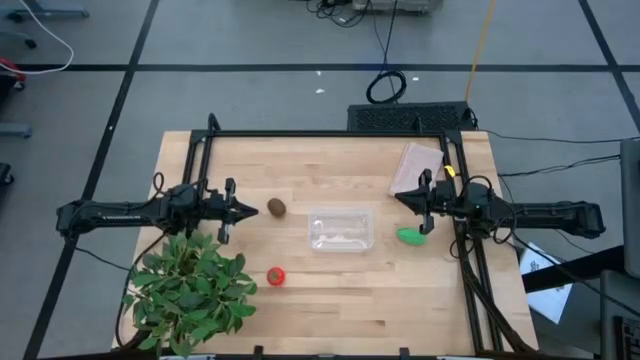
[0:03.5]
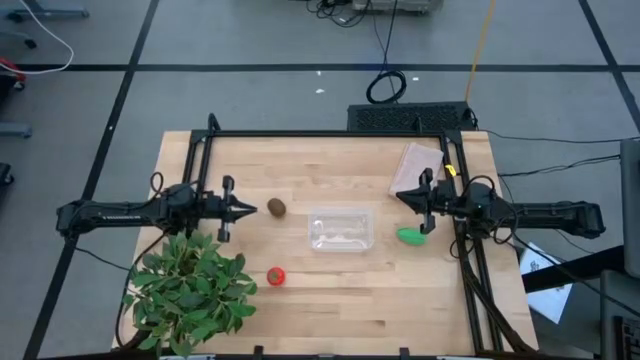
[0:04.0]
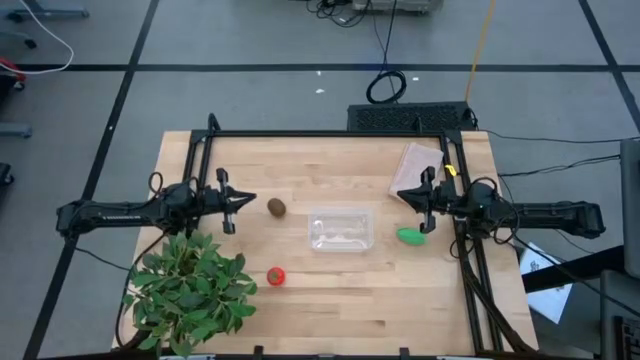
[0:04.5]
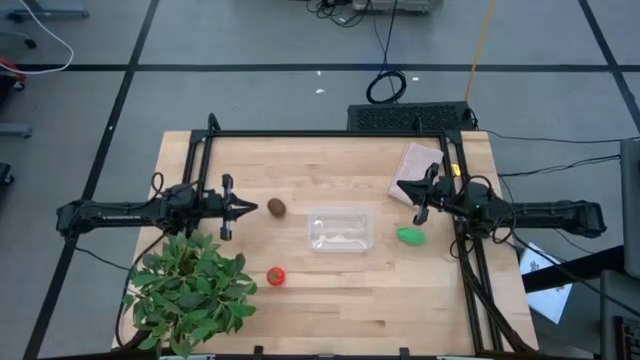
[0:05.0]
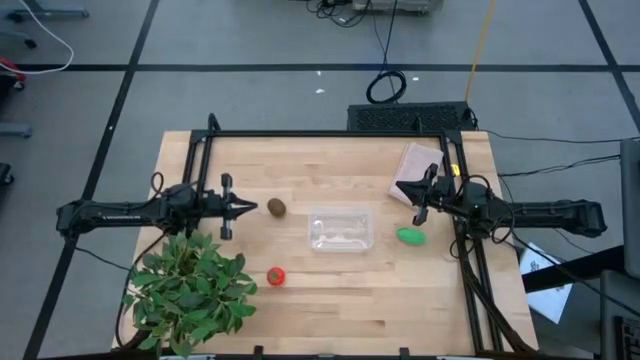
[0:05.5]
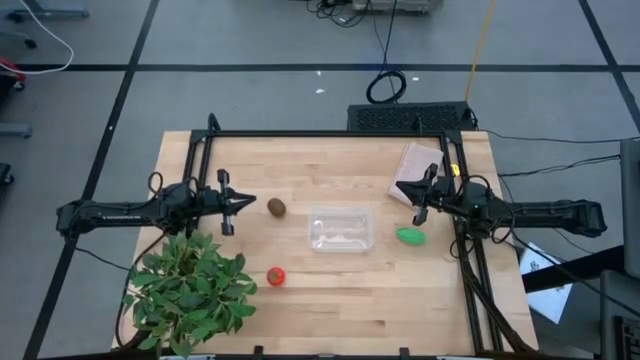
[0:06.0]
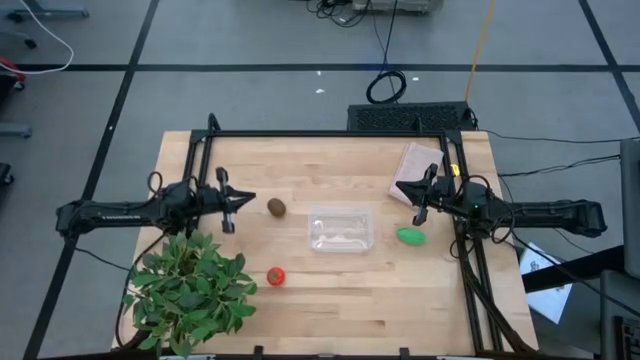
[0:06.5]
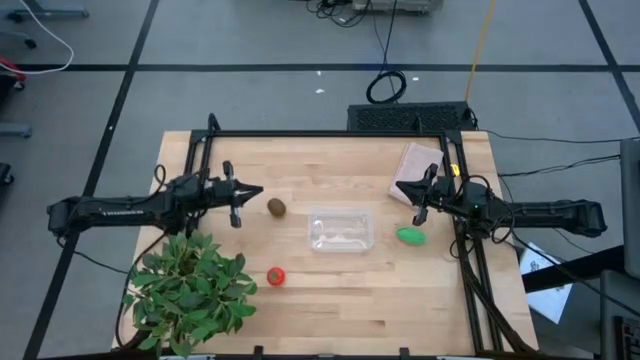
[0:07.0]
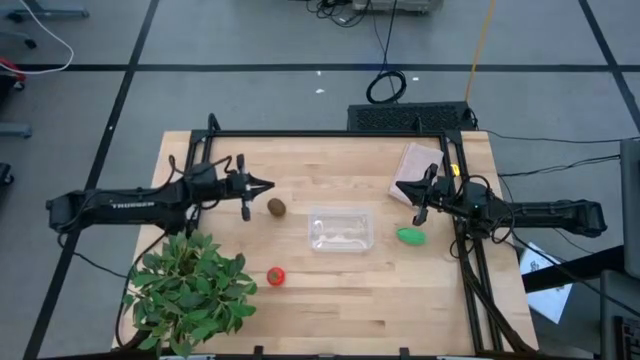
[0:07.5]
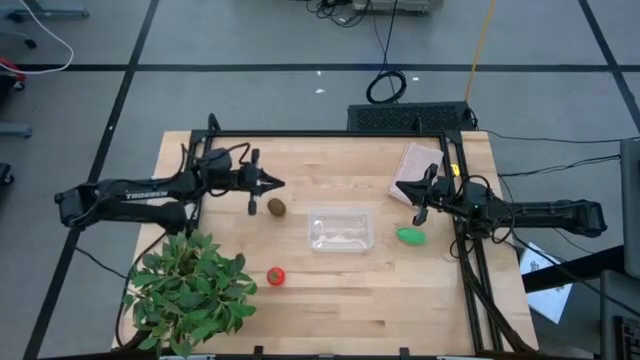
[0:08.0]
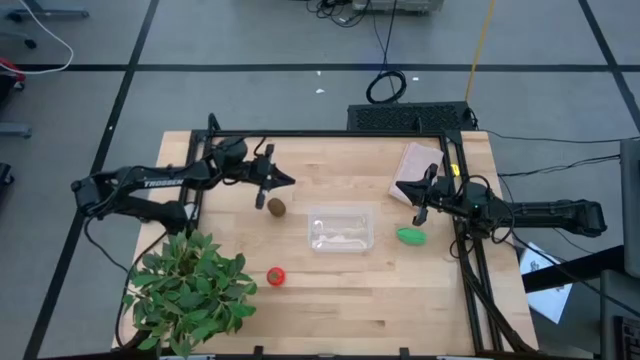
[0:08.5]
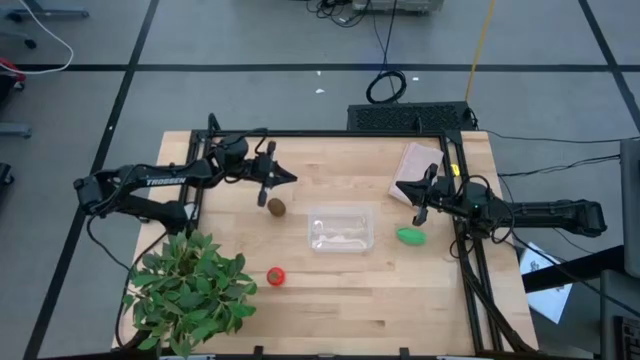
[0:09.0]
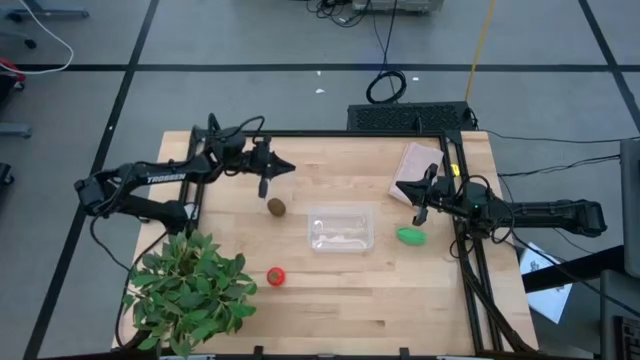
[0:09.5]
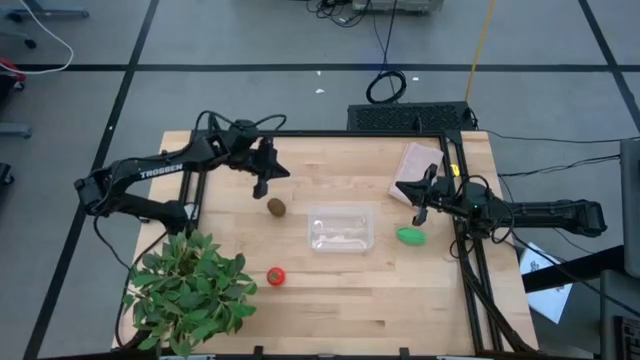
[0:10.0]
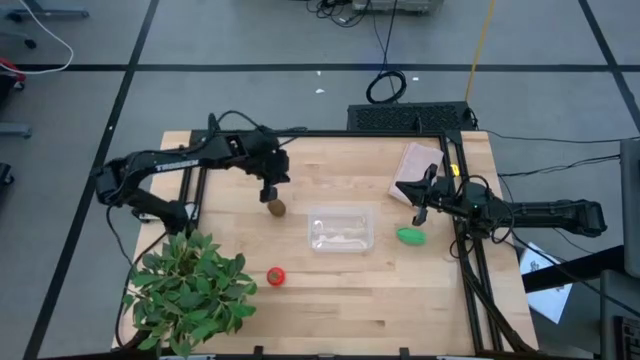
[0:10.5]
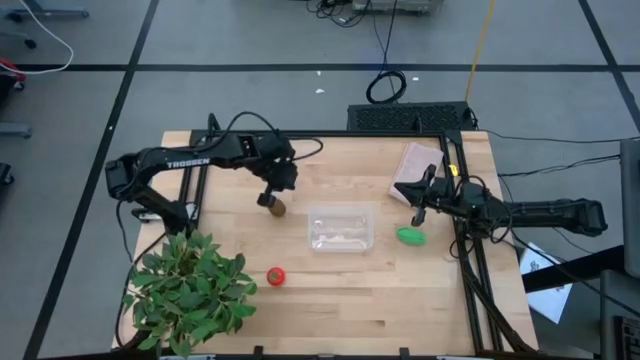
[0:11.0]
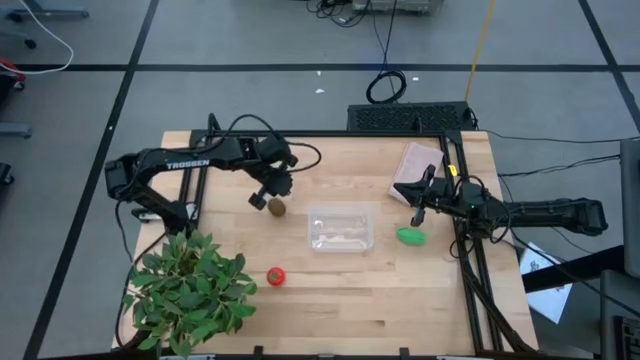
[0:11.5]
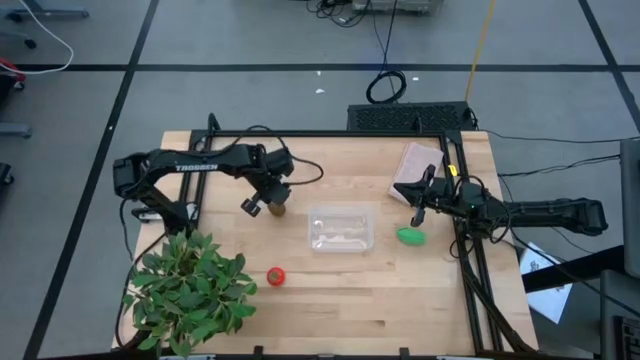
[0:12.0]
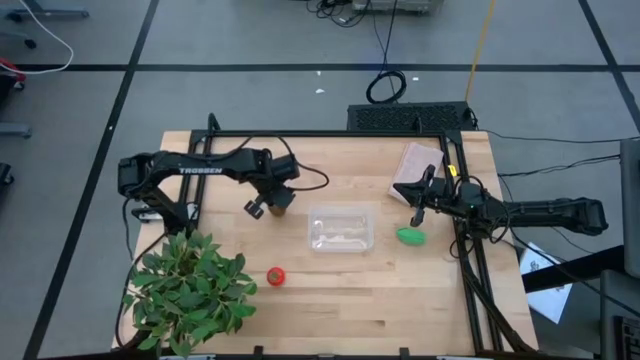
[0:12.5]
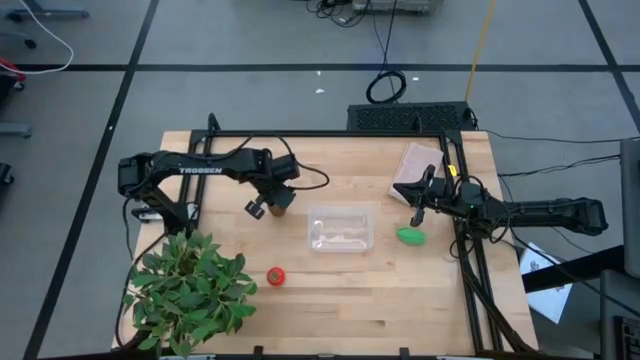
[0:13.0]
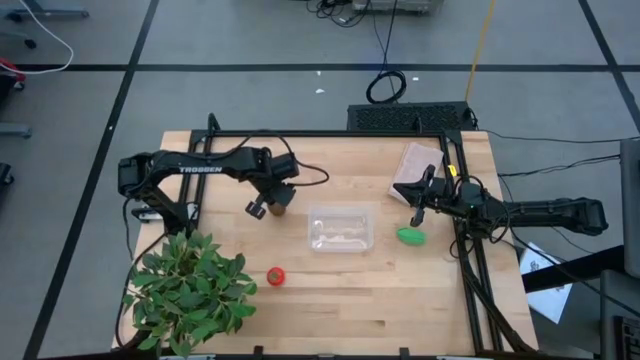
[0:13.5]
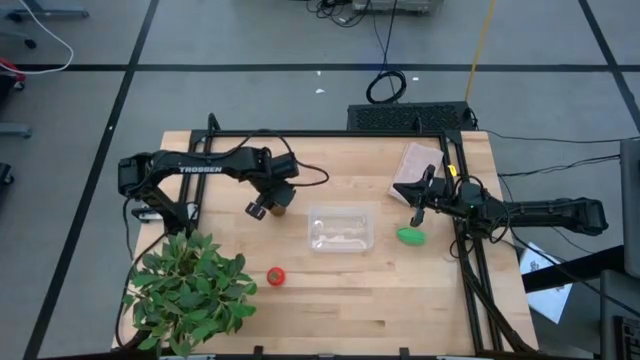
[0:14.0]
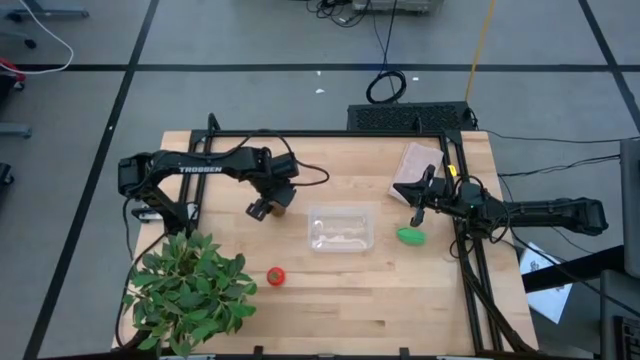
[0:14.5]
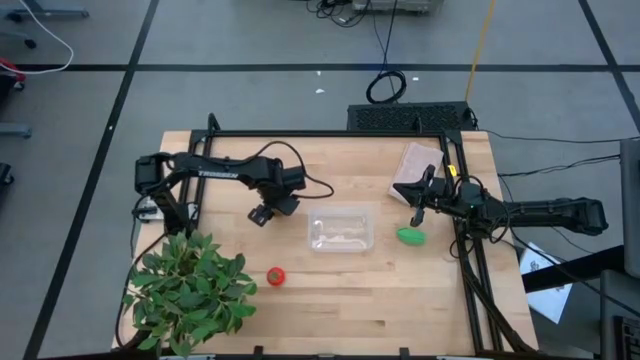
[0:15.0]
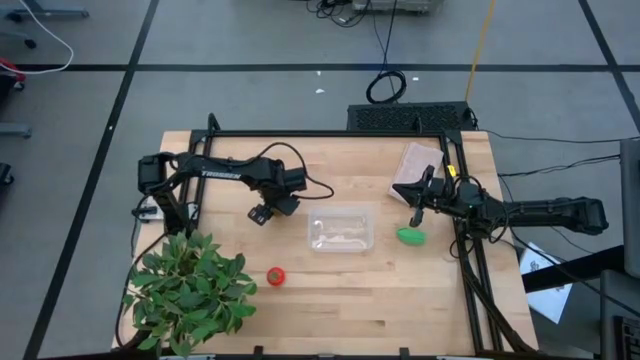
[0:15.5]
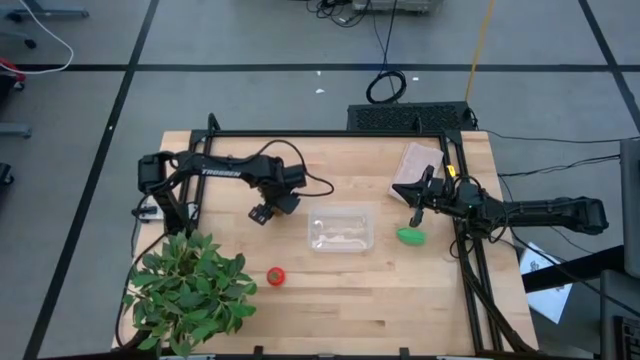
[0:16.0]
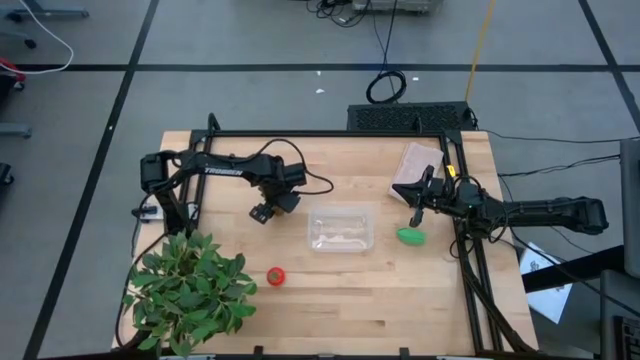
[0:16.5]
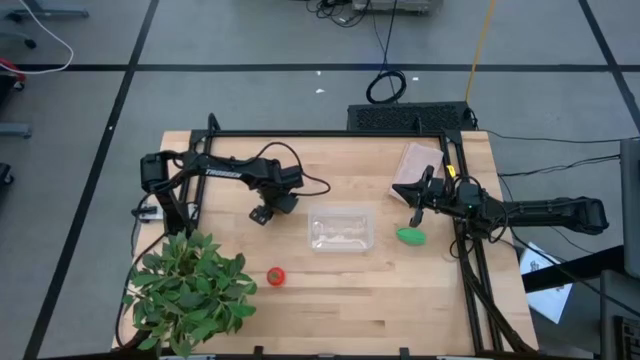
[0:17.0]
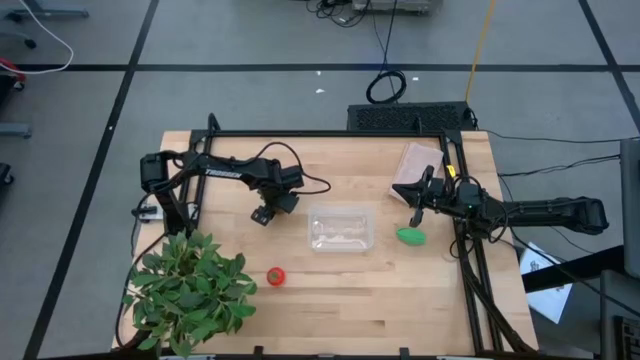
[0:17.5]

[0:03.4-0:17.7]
Task: Pick and placing Produce into tupperware
Put the brown kiwi into the transparent bin
